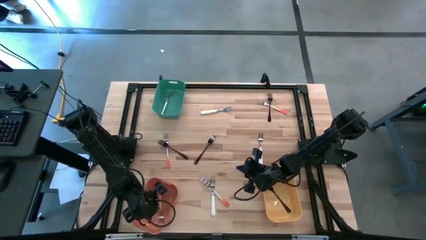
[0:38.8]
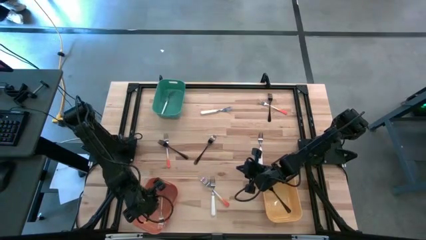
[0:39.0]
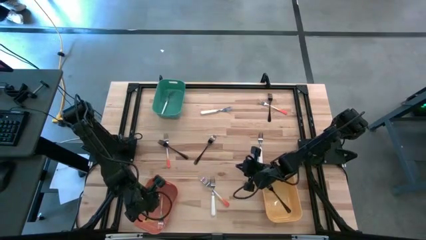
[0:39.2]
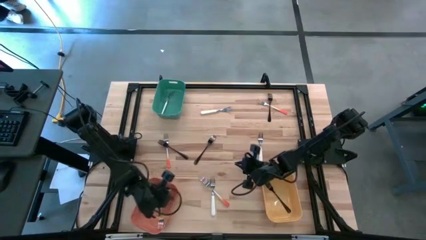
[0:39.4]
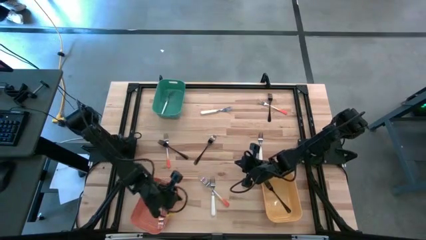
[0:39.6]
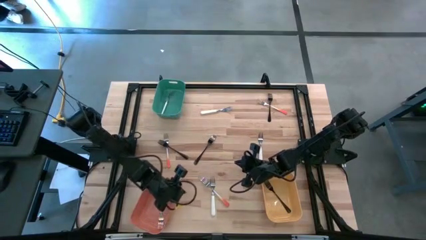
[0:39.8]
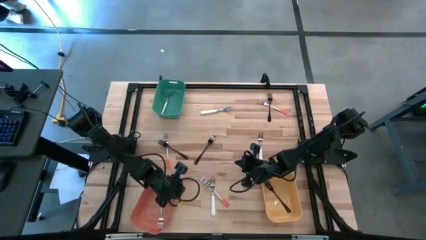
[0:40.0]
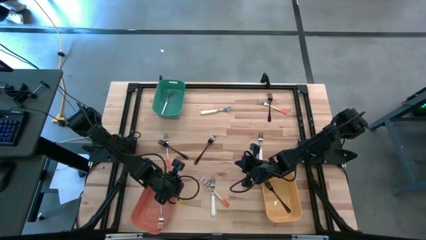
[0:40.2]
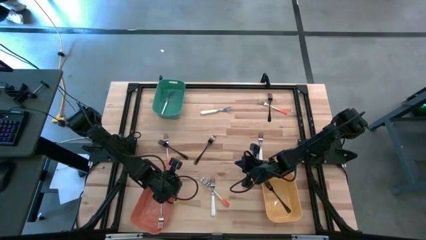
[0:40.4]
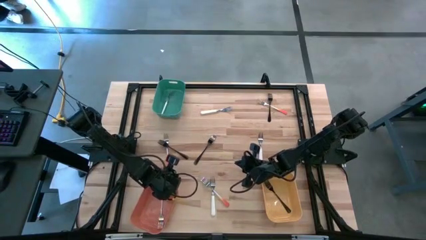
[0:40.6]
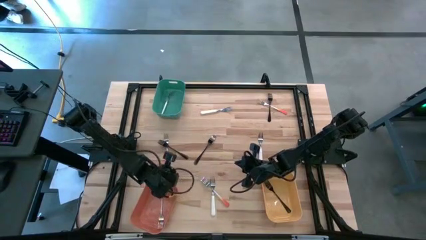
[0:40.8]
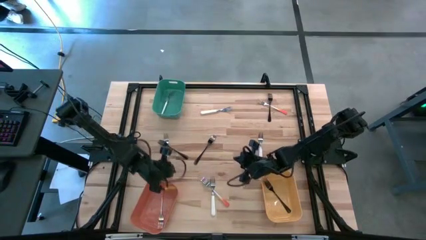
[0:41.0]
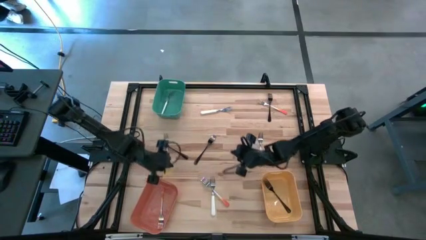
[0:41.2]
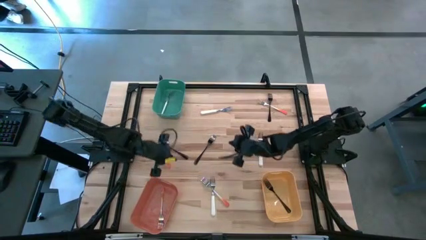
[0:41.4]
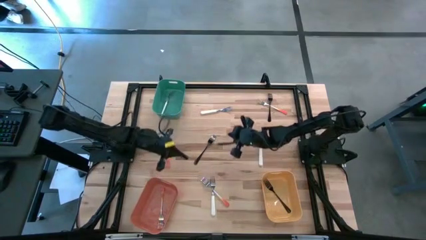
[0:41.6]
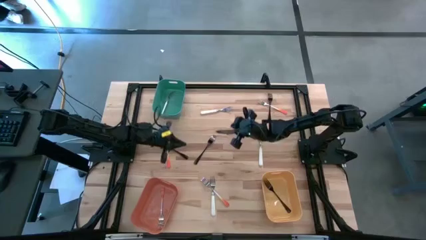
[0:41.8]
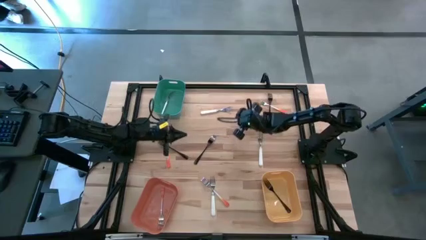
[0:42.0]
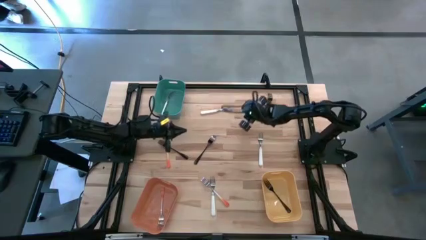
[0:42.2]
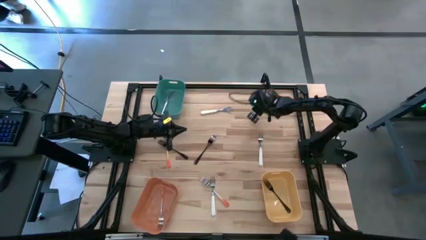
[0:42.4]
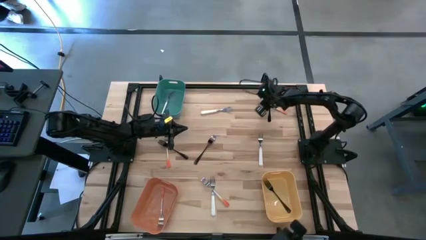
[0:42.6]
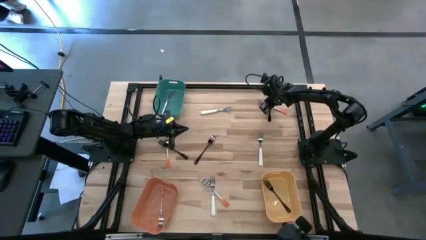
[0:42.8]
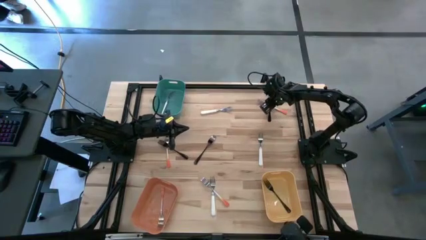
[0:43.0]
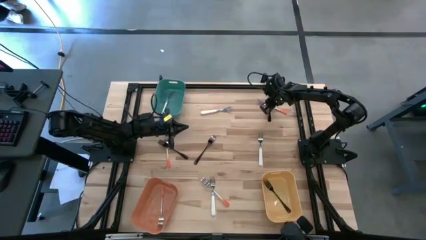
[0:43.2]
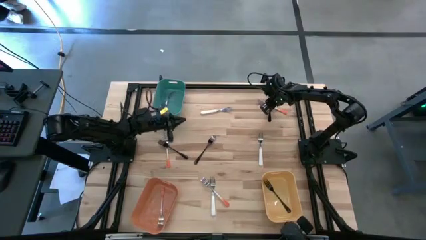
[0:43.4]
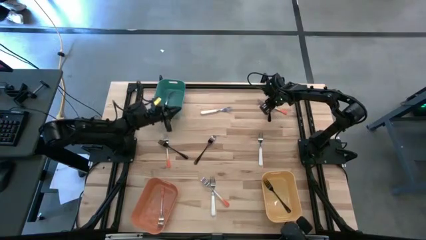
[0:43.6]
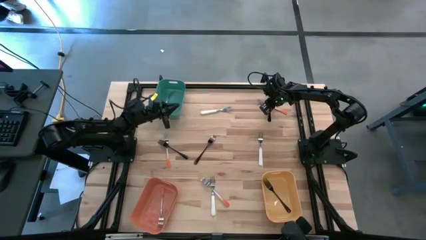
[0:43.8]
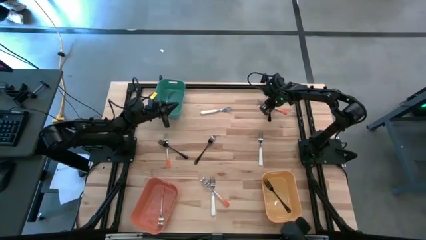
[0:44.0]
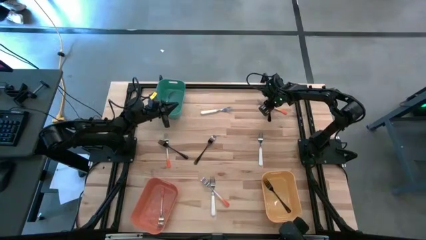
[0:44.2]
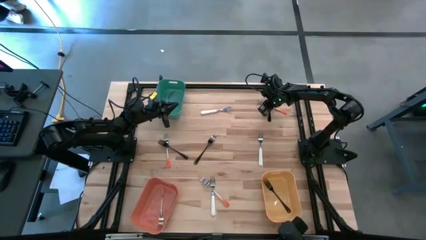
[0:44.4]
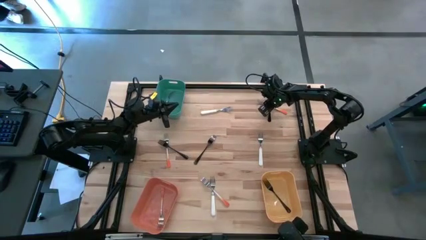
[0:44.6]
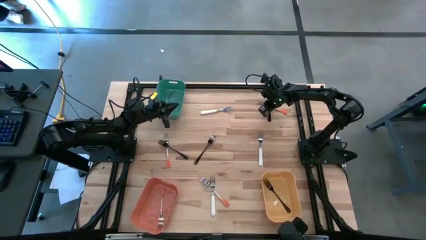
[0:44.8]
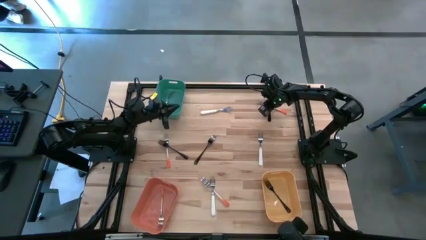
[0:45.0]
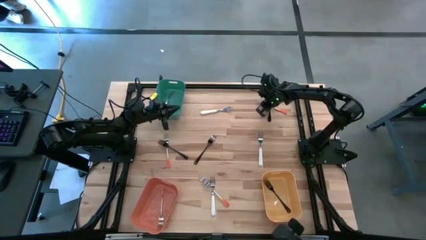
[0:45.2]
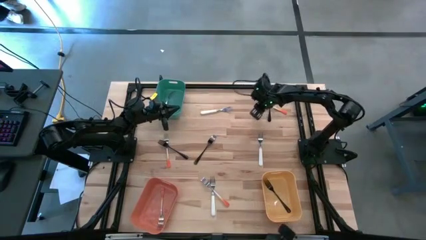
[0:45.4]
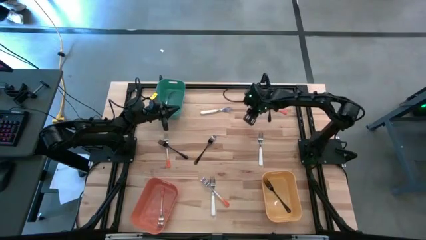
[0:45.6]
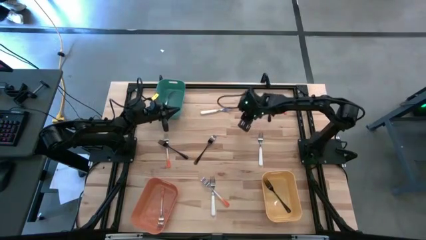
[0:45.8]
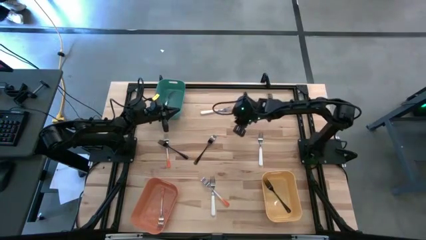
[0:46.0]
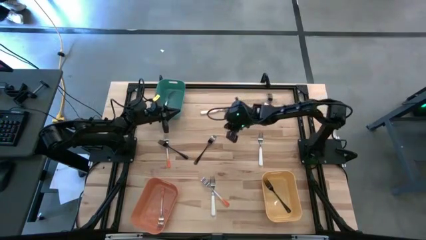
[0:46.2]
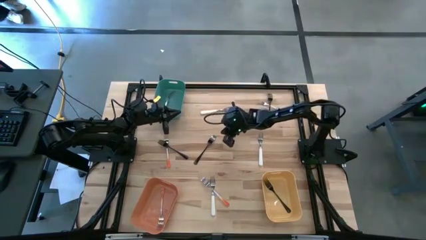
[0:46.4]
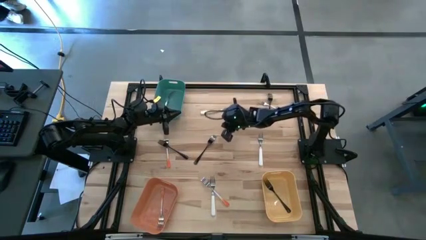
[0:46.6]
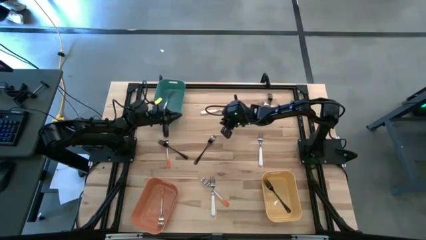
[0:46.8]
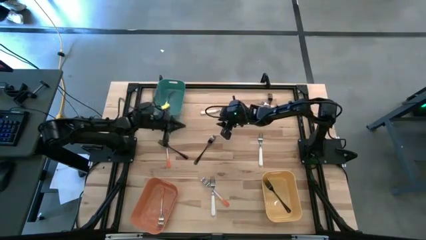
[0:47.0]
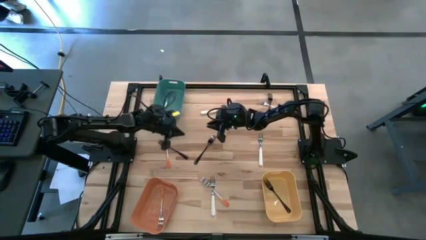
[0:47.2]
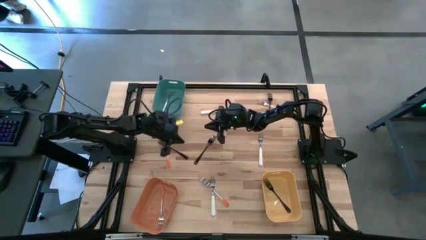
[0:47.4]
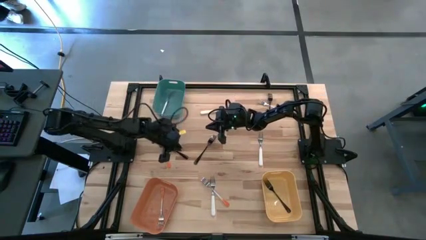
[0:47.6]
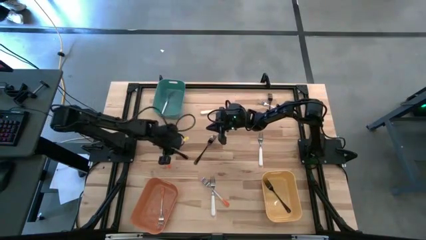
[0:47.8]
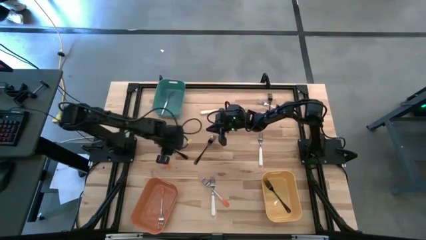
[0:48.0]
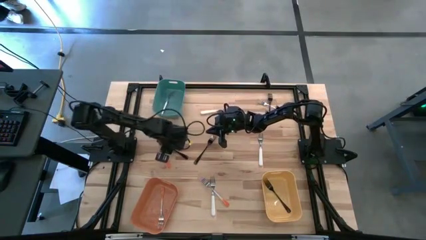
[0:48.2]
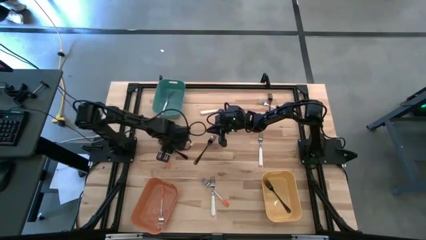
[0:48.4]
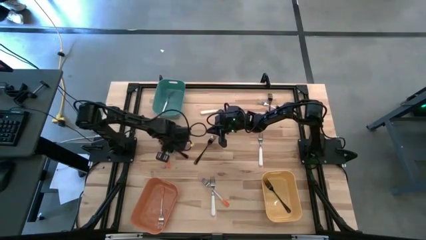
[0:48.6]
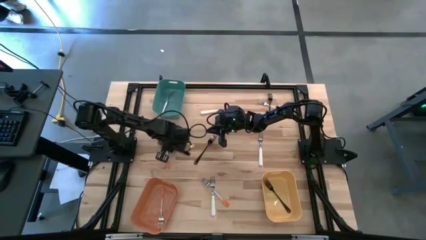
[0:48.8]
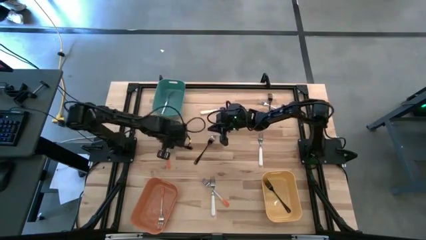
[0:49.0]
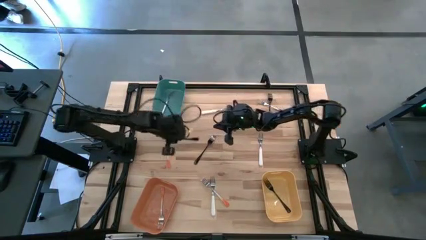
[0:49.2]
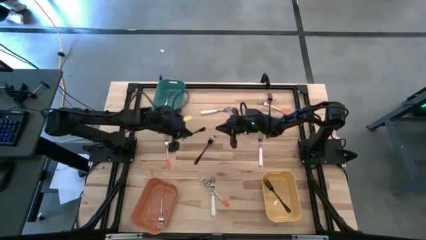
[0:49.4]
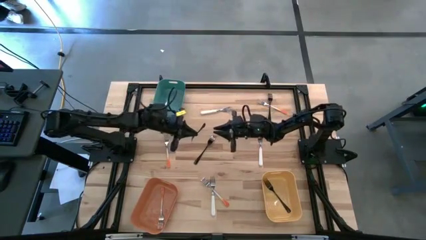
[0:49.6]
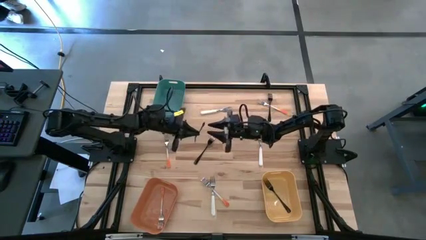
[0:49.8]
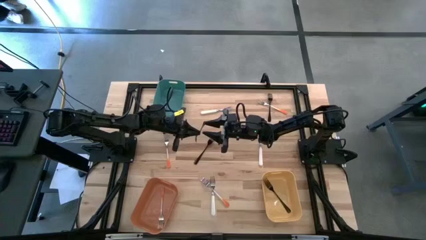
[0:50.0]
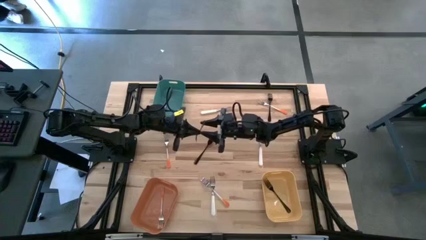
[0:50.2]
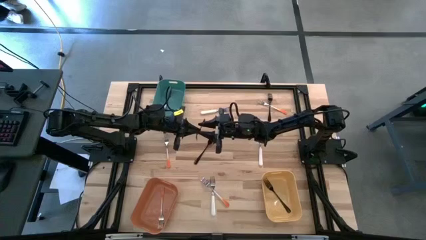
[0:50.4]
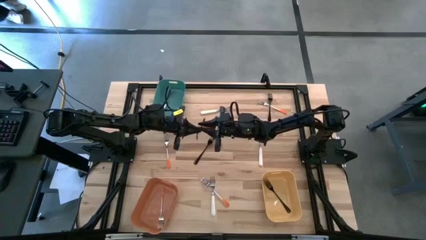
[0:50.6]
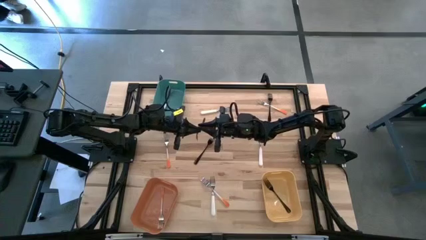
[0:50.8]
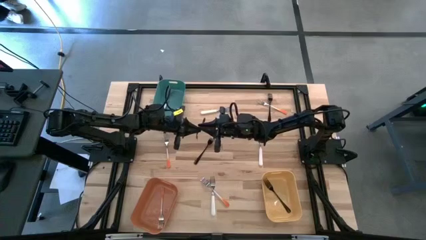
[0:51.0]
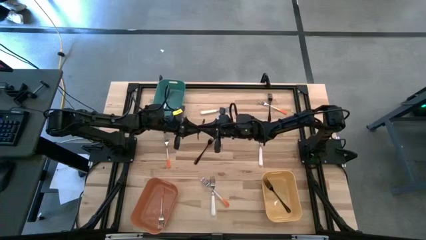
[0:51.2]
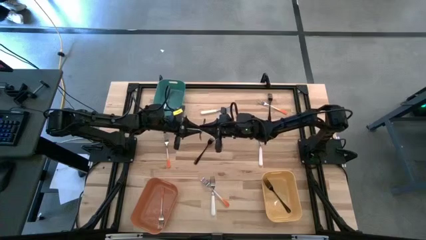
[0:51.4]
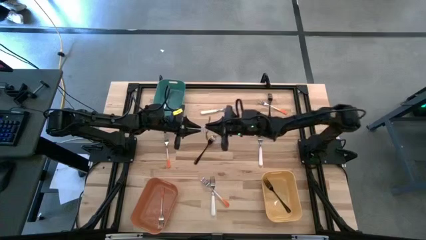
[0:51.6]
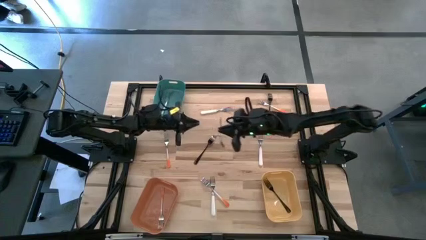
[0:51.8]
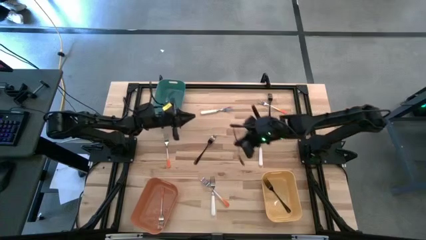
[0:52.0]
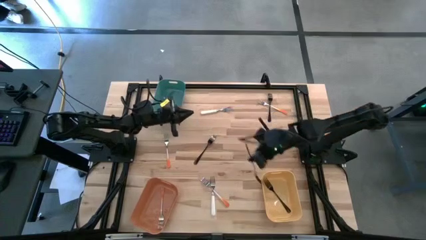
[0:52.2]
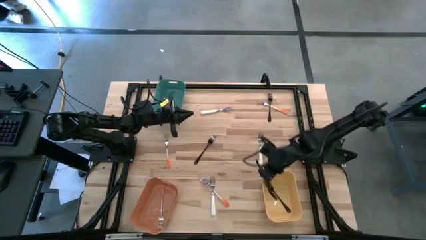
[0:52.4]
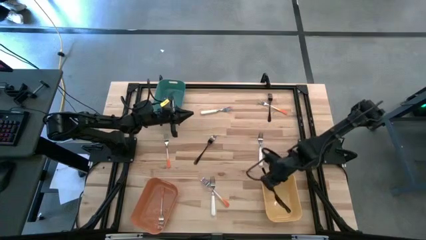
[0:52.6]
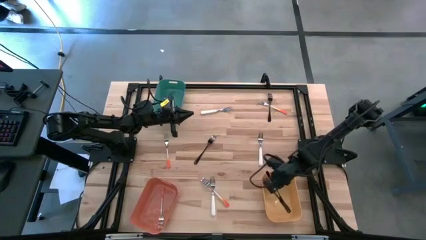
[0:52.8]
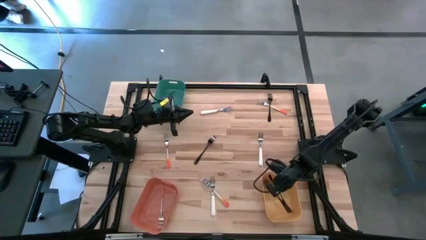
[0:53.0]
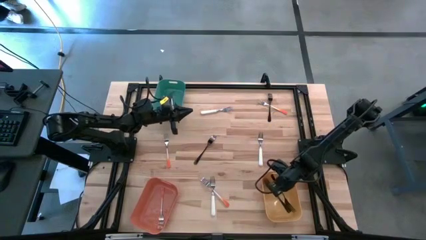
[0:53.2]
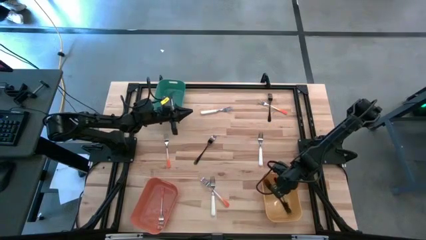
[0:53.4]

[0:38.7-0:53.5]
Task: Sort silverware by color (type)
Put the black fork into the yellow bin
